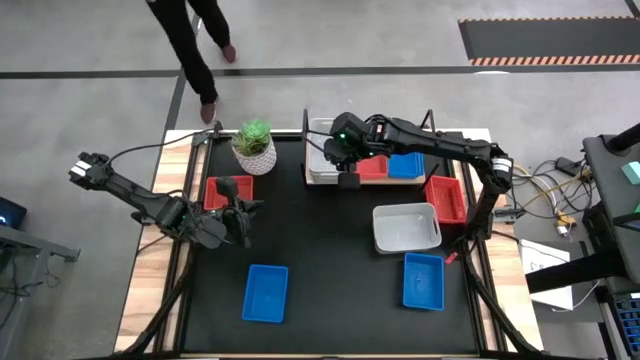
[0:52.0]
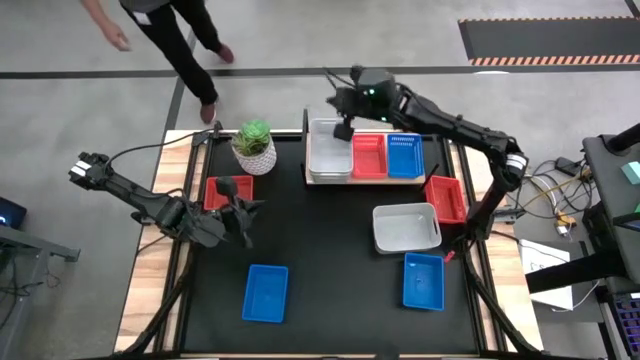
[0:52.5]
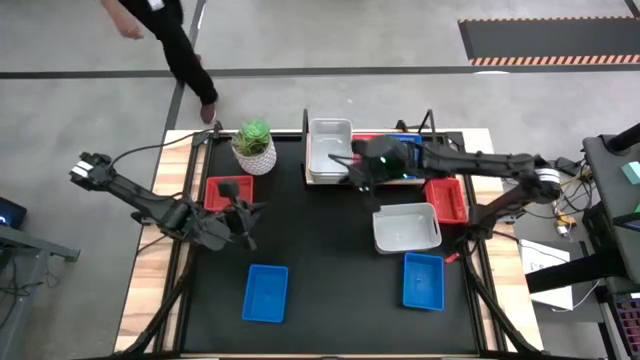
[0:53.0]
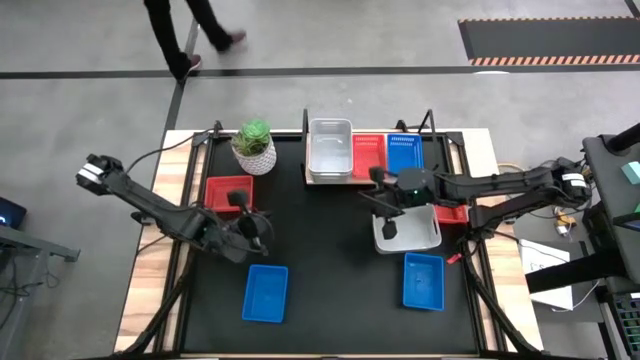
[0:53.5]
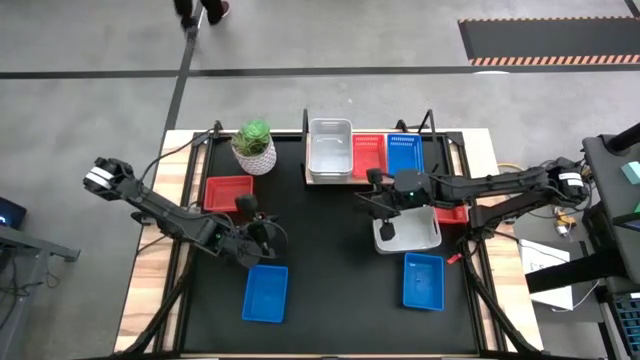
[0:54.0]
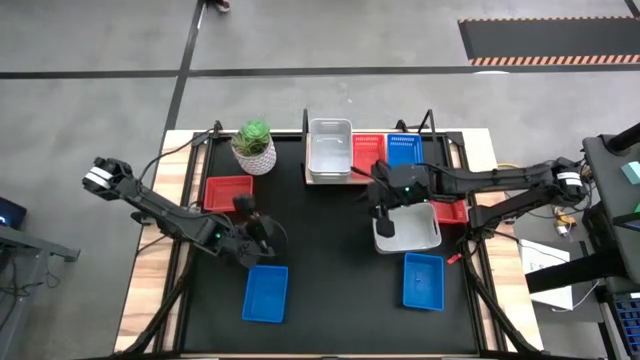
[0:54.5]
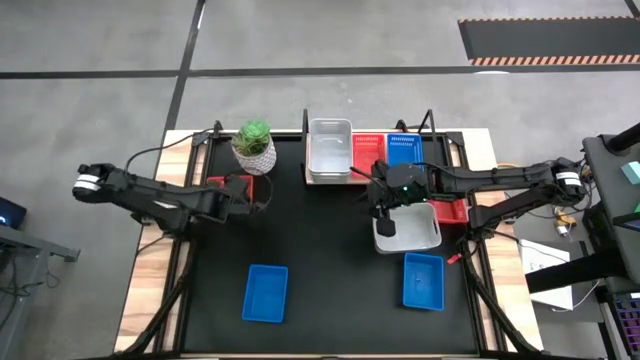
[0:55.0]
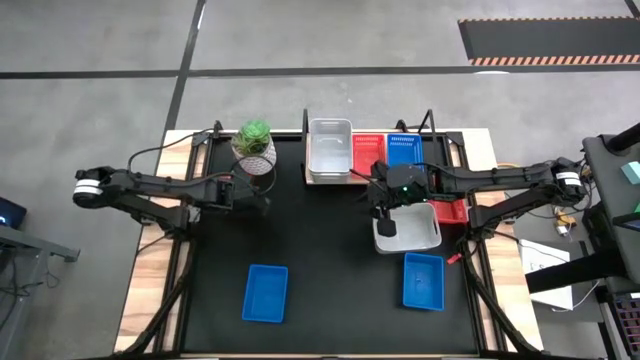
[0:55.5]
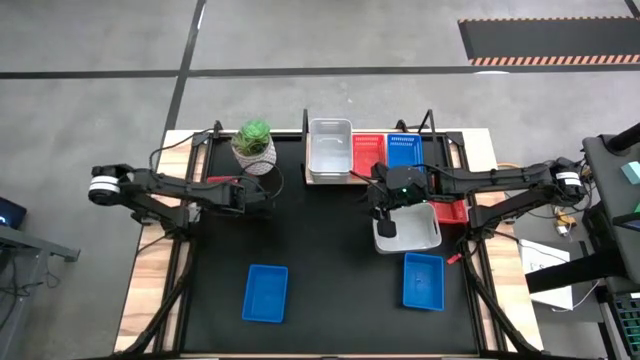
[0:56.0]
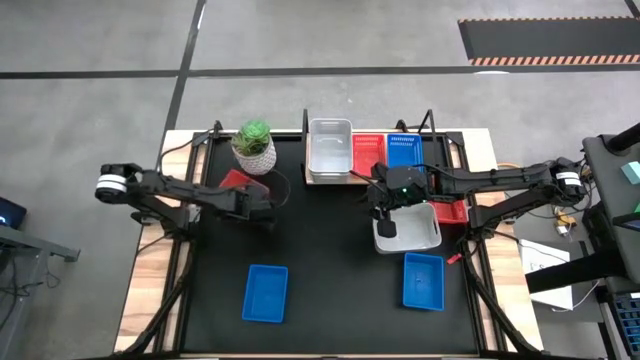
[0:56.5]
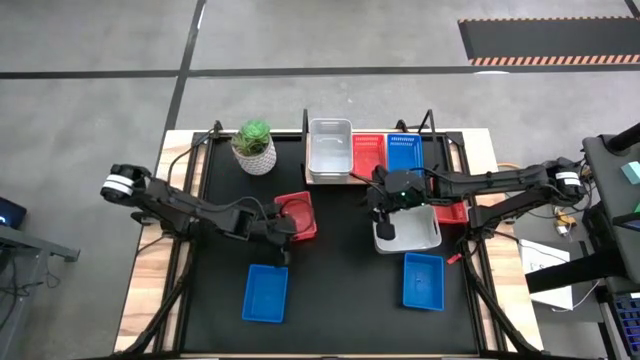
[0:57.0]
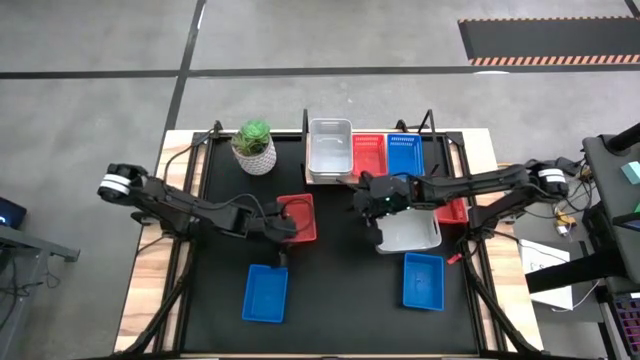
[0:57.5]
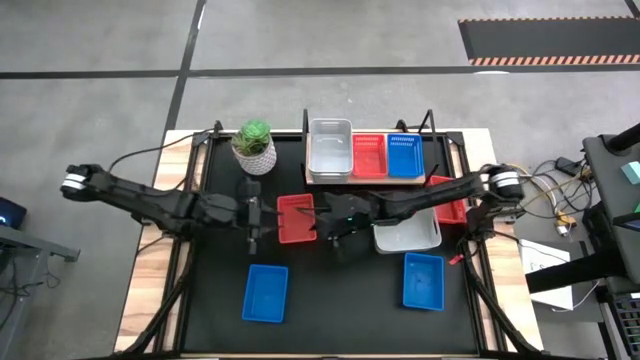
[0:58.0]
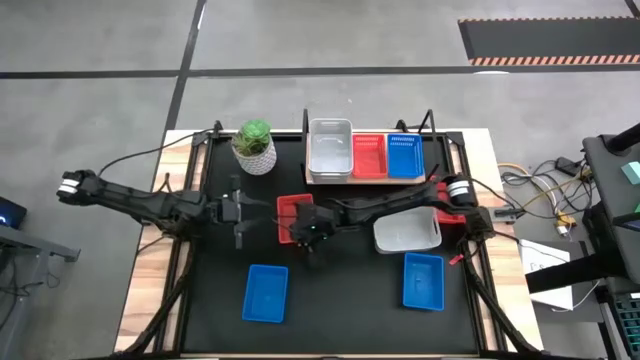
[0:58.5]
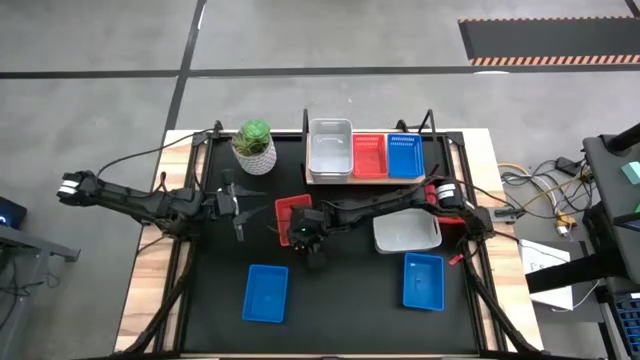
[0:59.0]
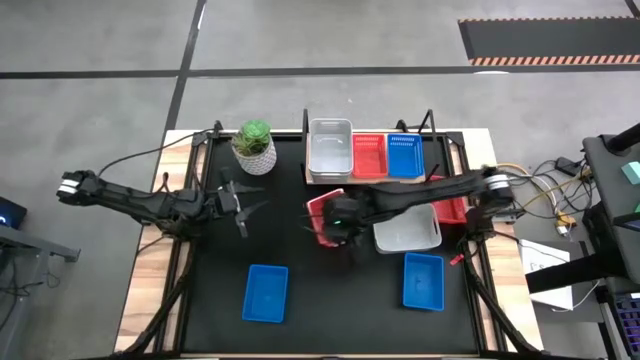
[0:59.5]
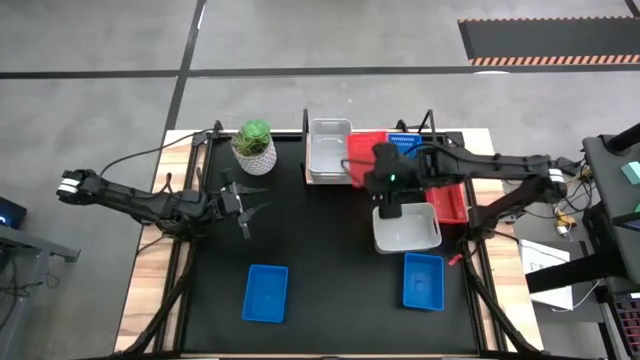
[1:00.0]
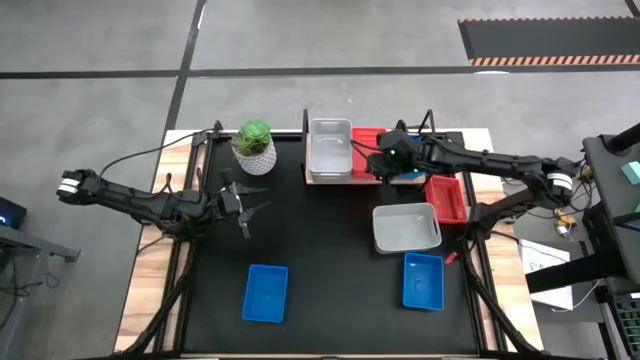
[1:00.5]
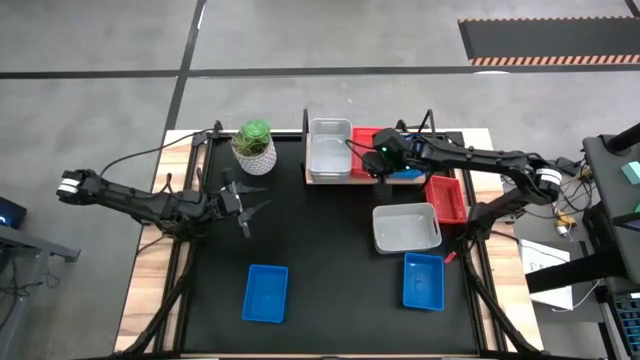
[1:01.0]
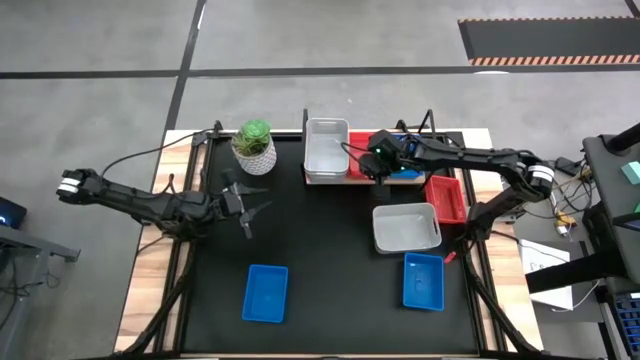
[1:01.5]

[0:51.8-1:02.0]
Task: Stack baskets on shelf by color
Stack the left red bin on the red bin on the shelf

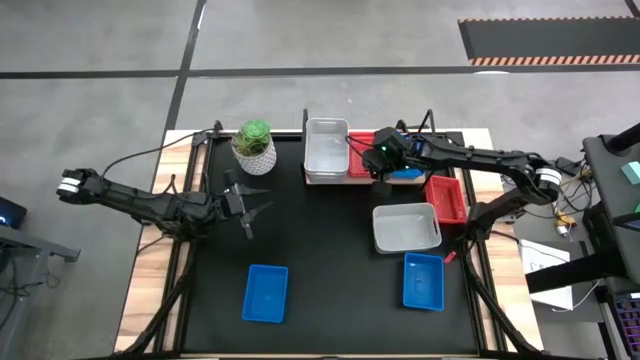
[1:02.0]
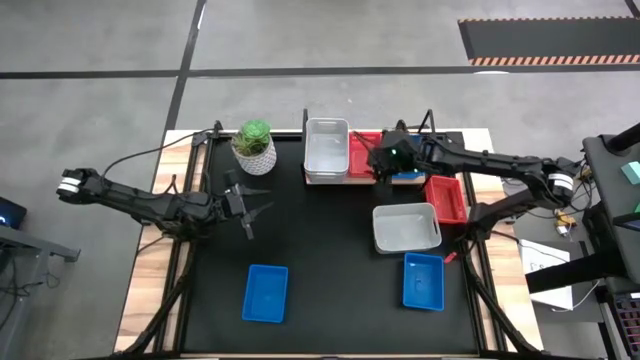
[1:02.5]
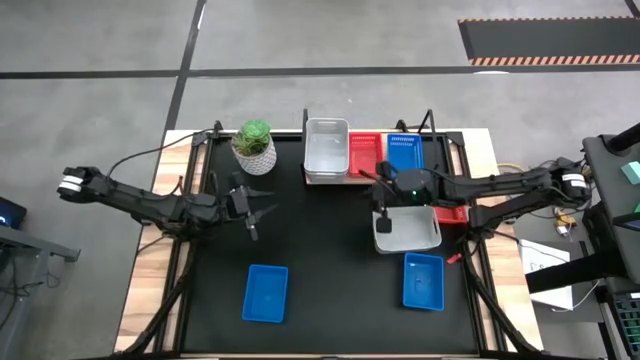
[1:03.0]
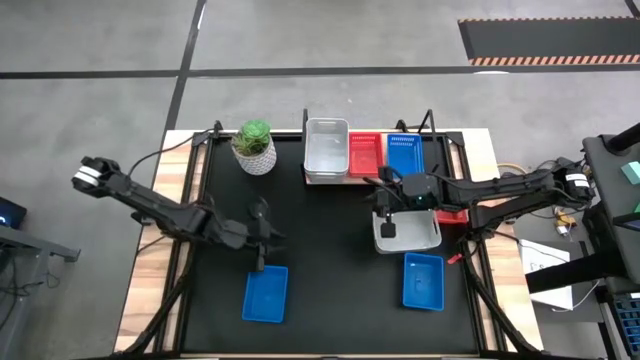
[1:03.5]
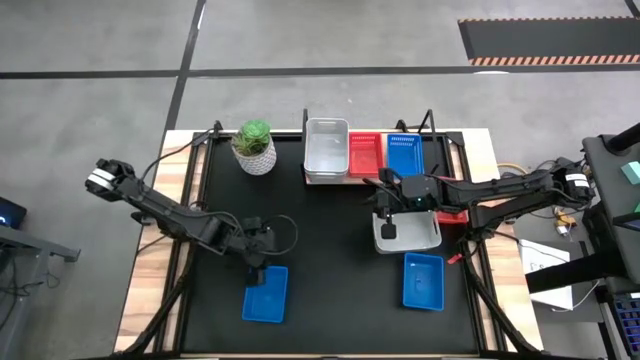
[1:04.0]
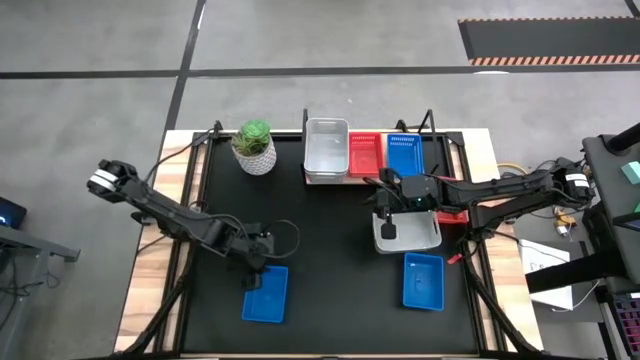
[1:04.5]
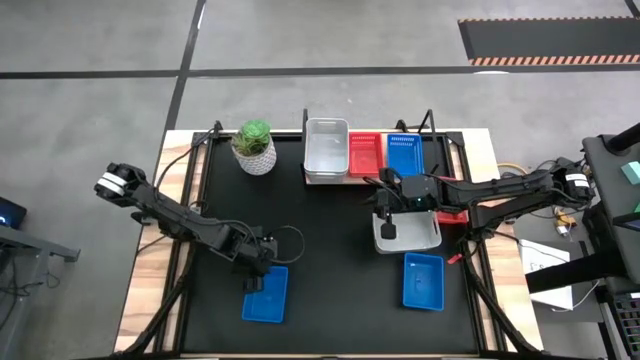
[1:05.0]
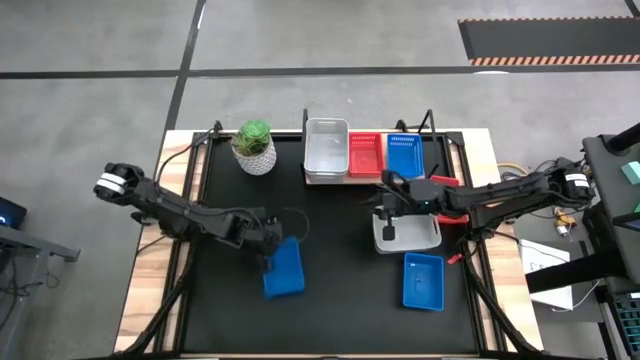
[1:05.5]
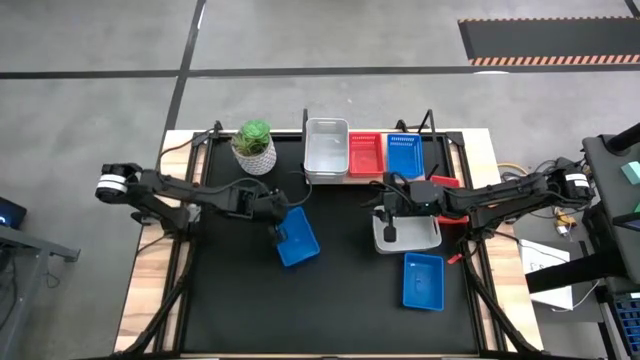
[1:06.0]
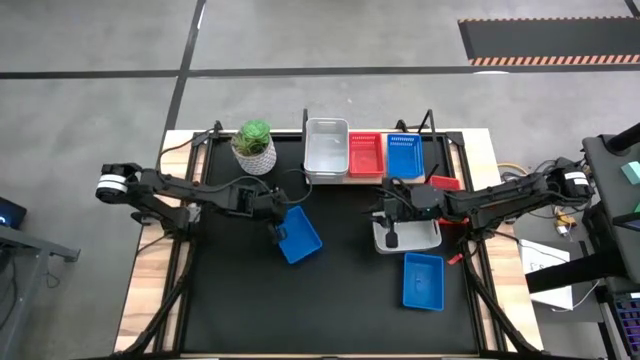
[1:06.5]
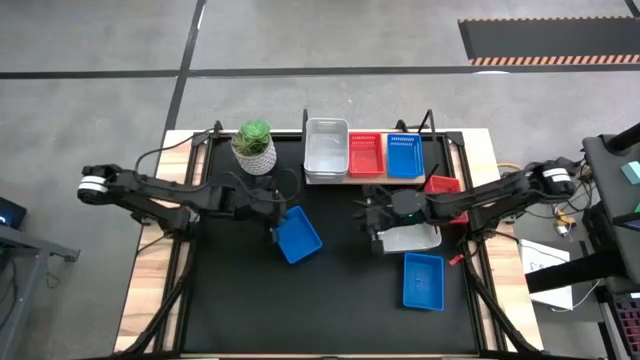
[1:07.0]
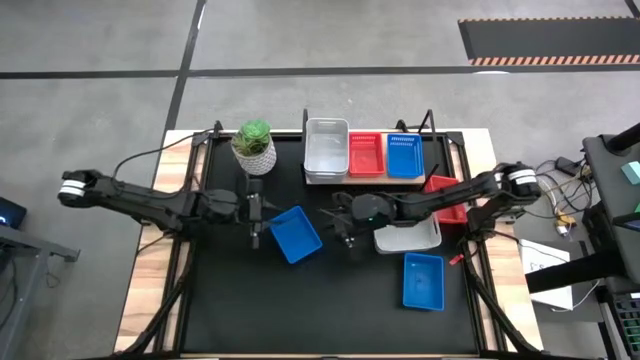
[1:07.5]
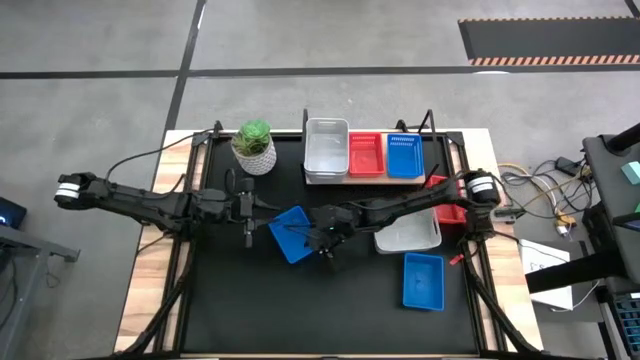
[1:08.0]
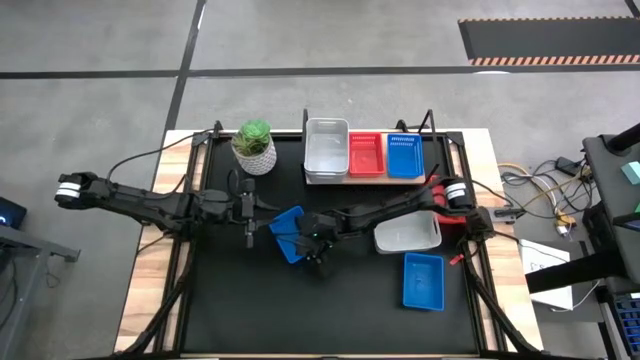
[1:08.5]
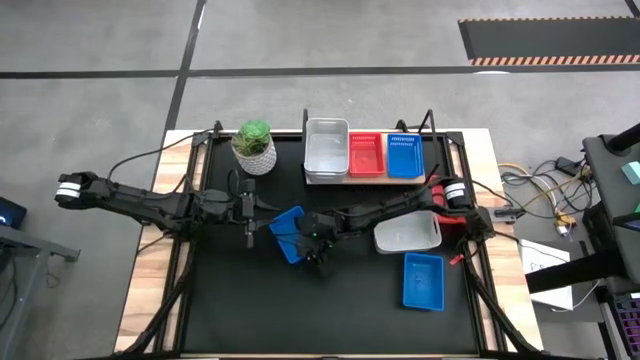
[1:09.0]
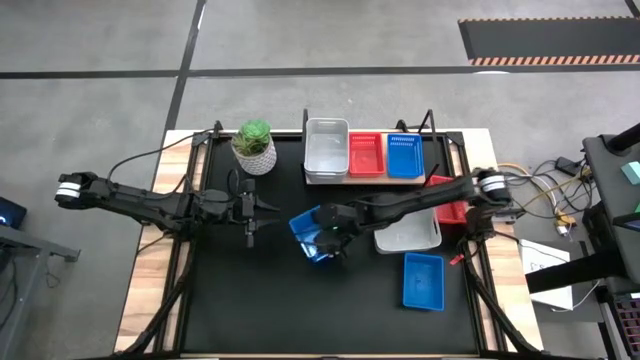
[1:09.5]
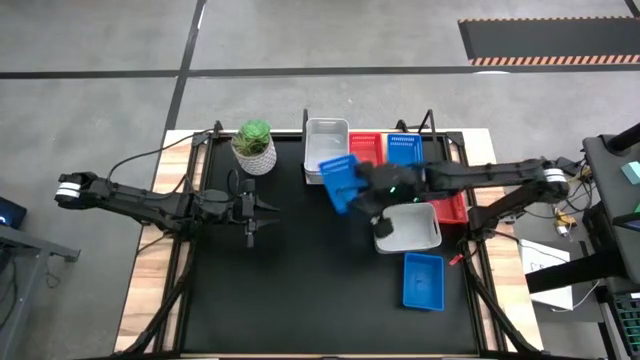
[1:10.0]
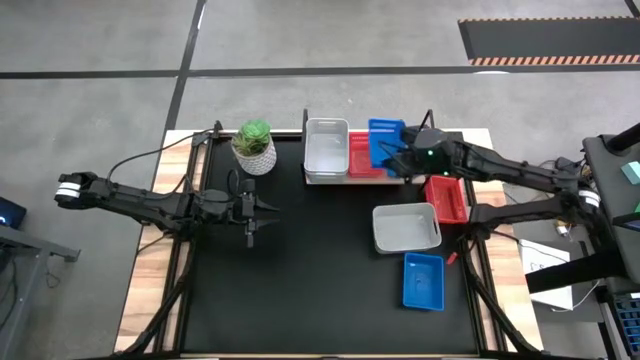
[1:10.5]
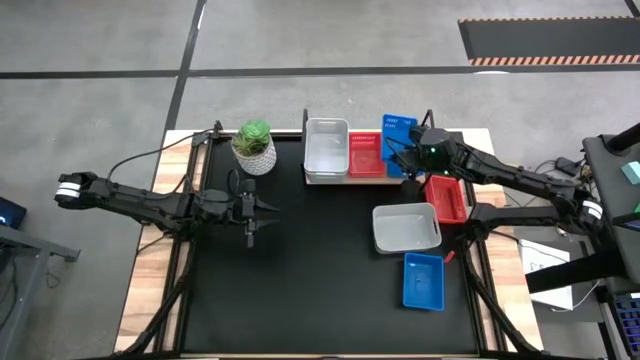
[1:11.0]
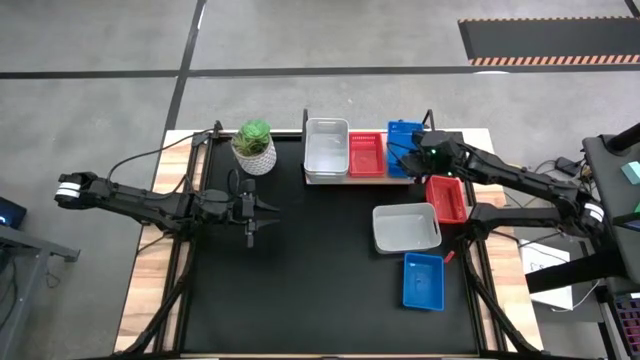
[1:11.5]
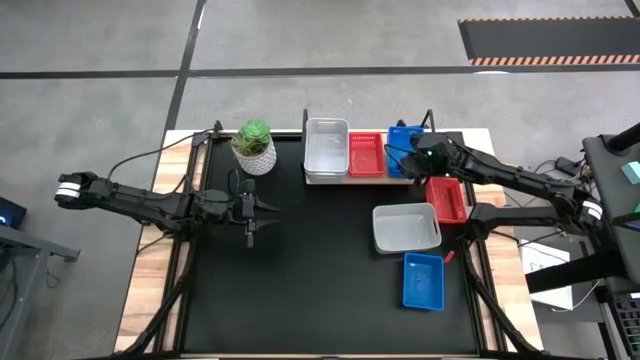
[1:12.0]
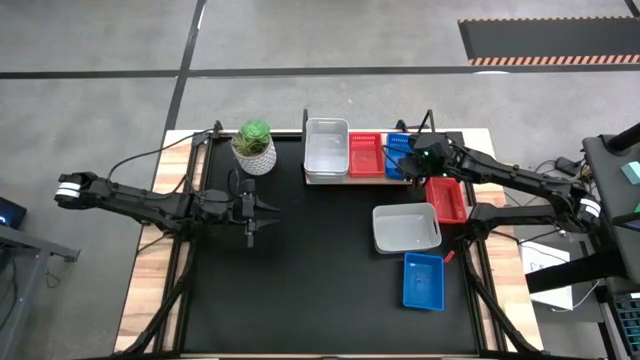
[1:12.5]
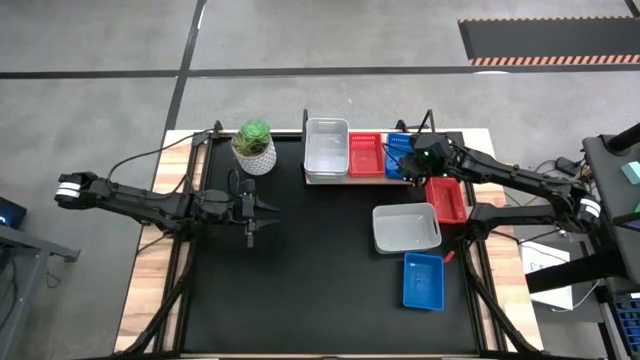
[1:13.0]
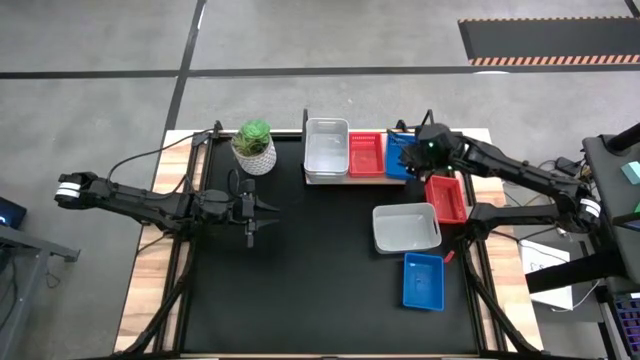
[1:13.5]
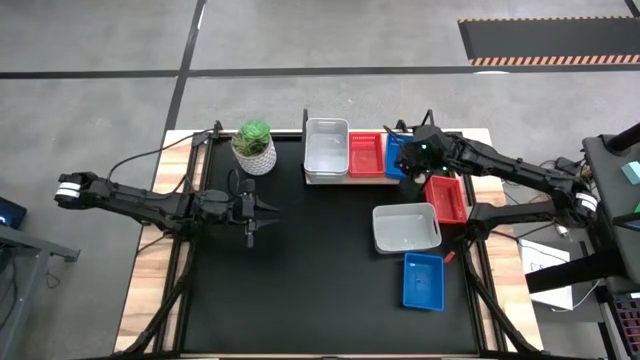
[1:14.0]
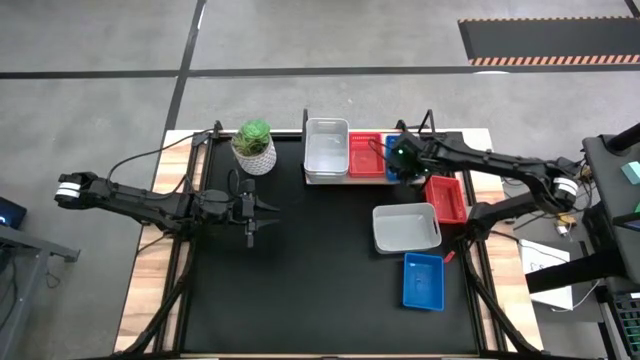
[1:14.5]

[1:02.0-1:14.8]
Stack the left blue bin on the blue bin on the shelf
